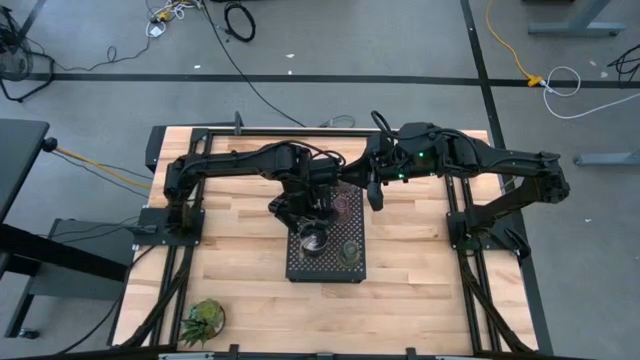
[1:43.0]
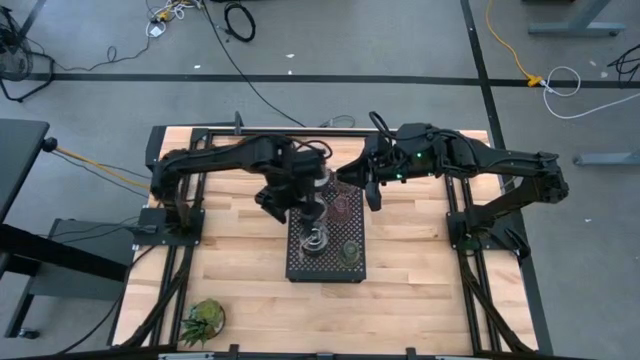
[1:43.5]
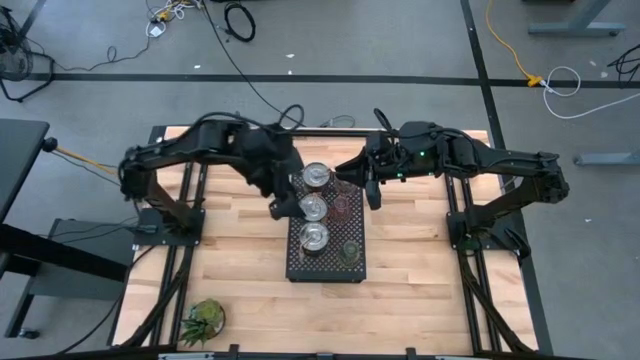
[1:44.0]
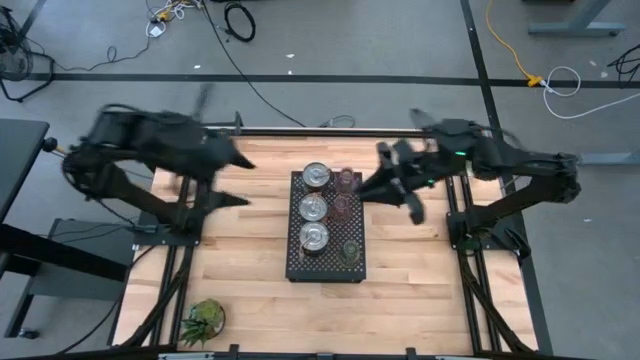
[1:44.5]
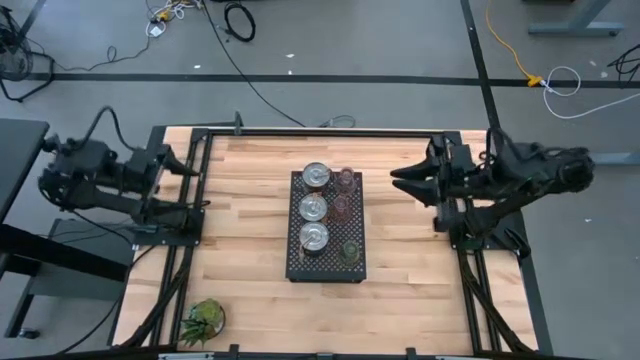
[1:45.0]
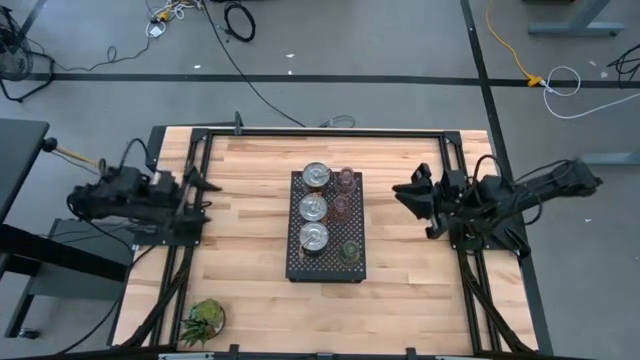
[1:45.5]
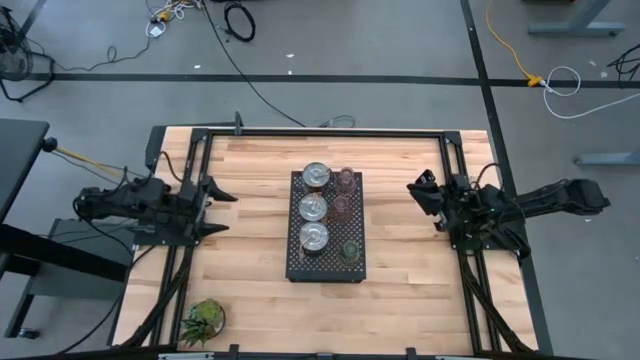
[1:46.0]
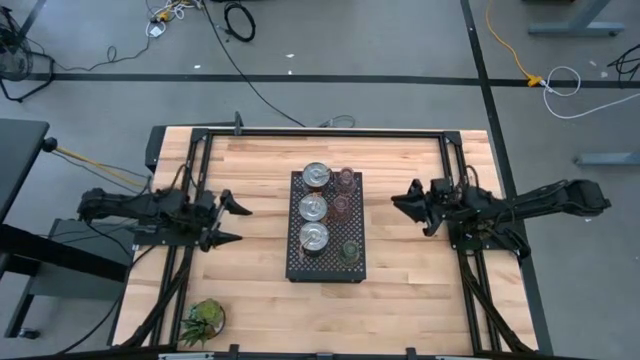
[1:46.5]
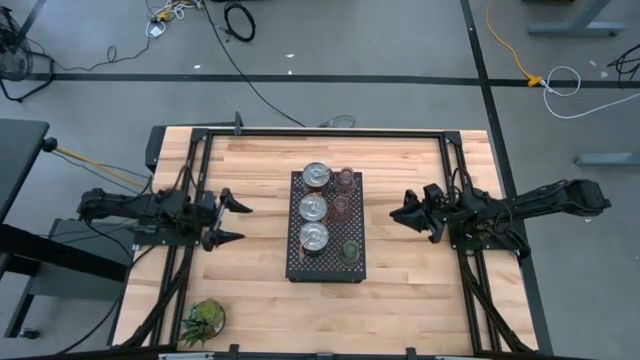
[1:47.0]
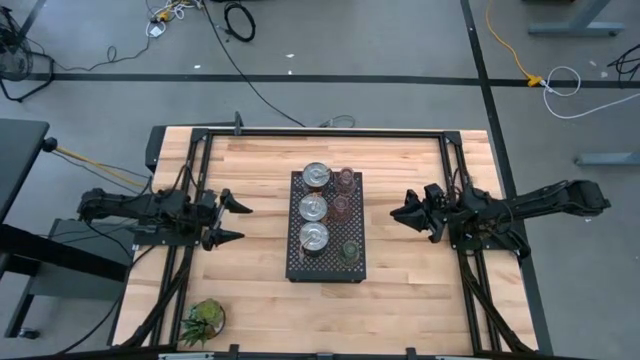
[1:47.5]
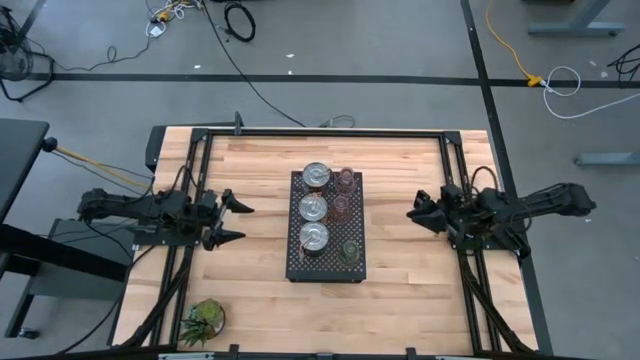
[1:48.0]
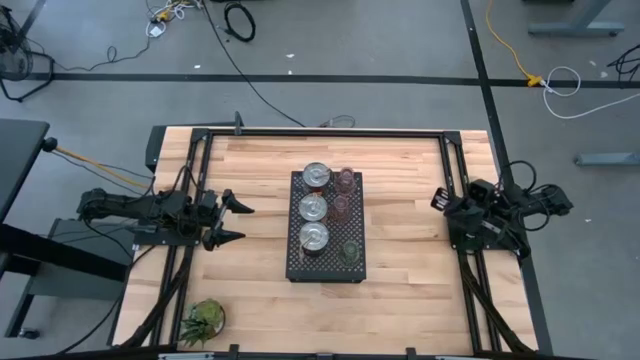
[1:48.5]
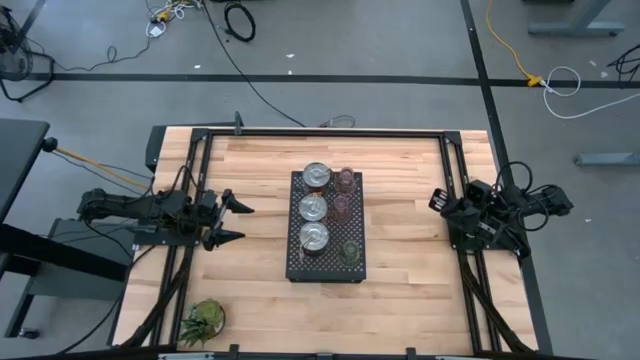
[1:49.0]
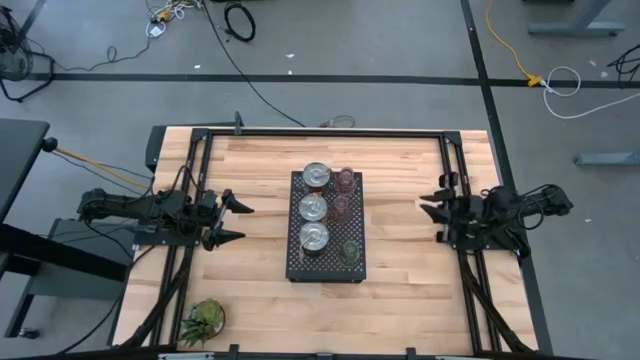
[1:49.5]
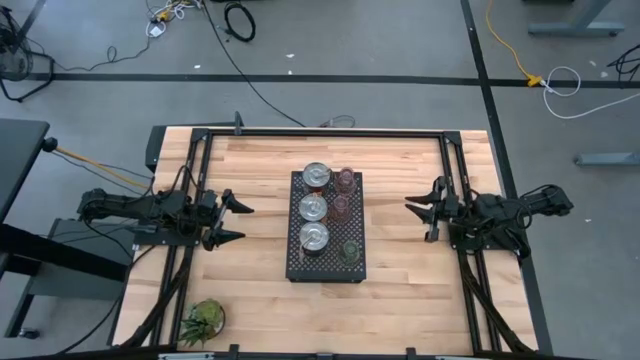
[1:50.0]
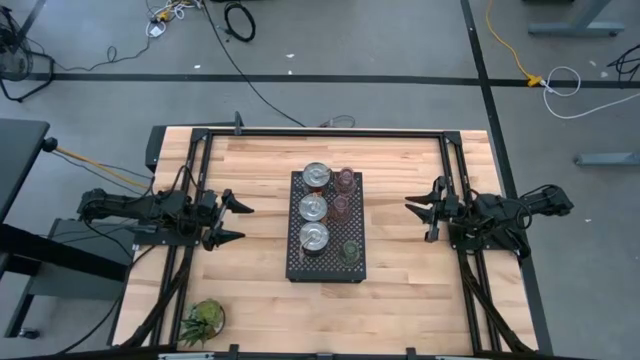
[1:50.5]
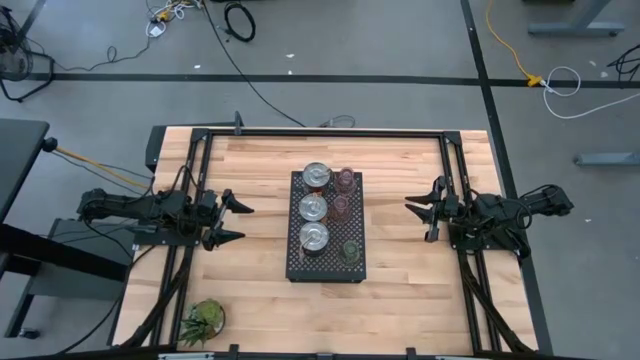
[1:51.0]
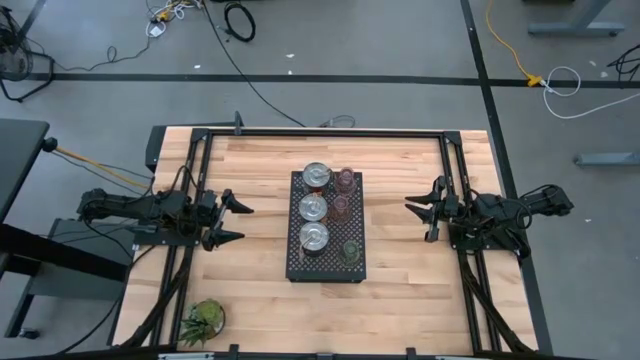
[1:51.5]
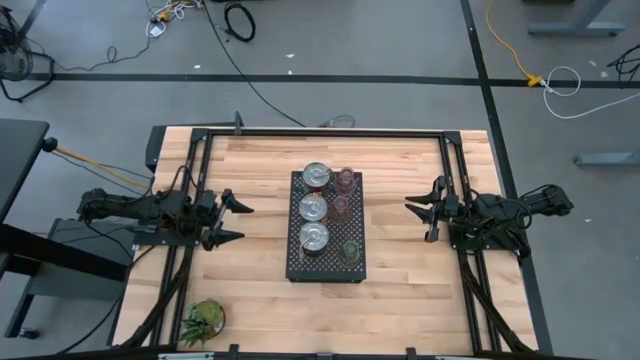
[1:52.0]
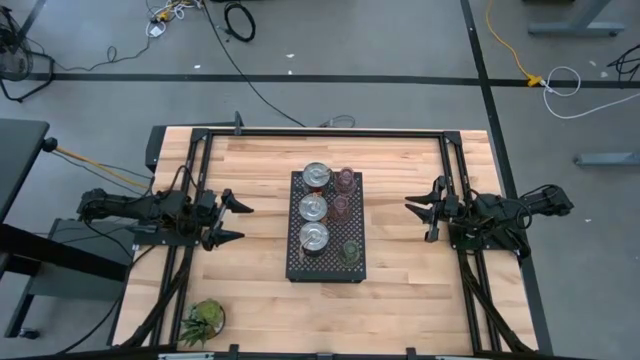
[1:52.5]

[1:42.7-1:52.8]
Task: Pick & Place candle stick holders
Return to Home Position

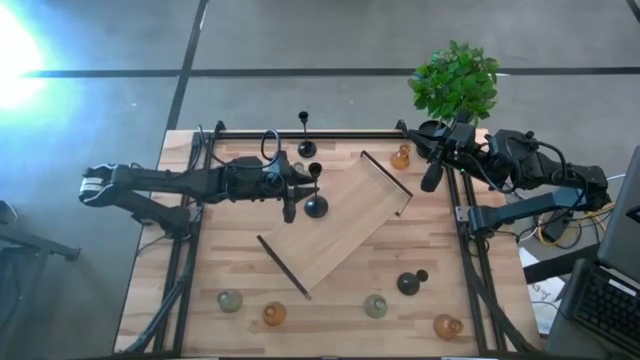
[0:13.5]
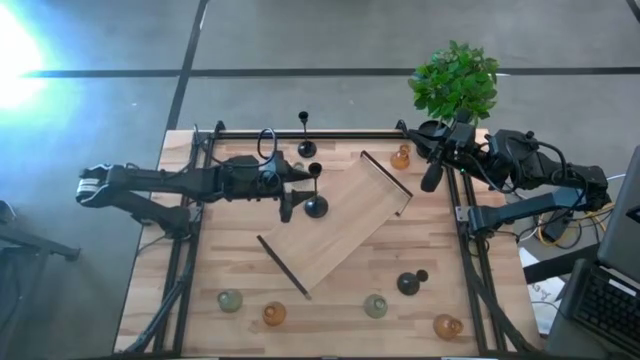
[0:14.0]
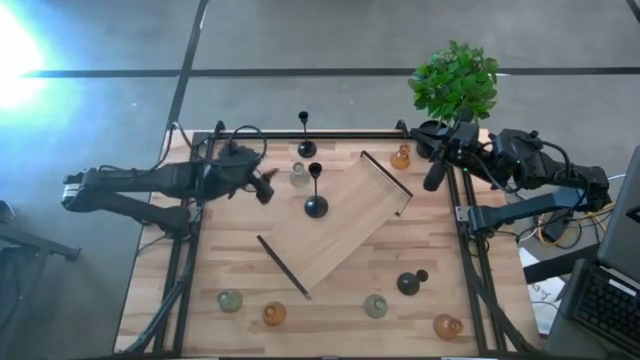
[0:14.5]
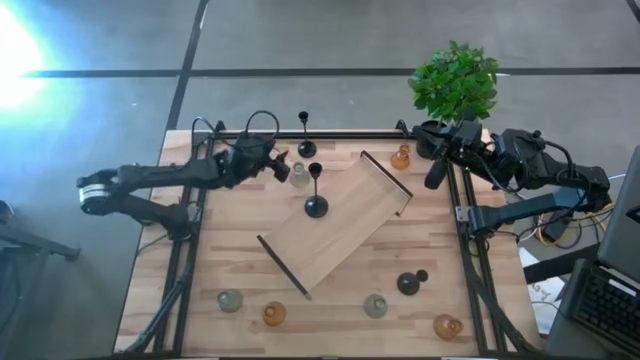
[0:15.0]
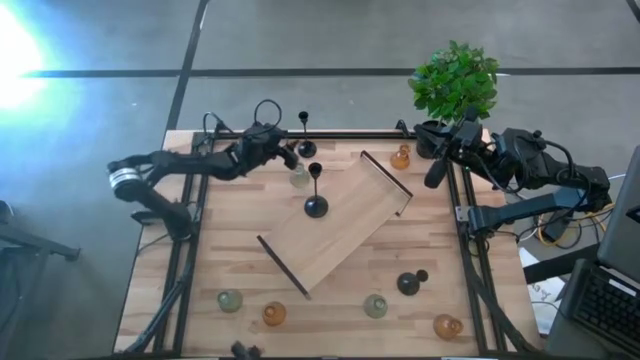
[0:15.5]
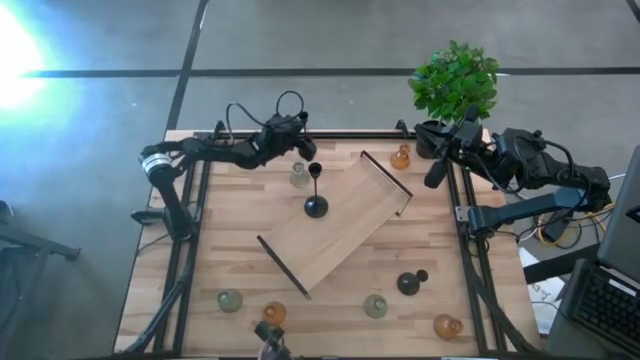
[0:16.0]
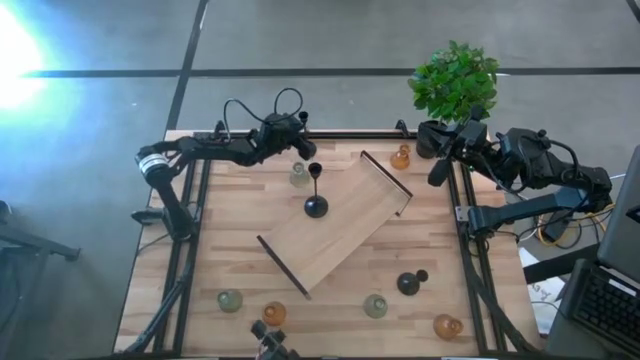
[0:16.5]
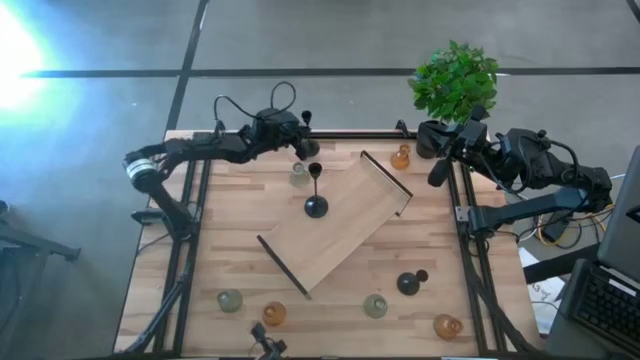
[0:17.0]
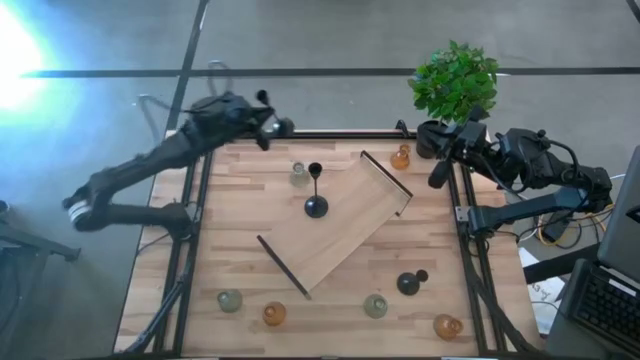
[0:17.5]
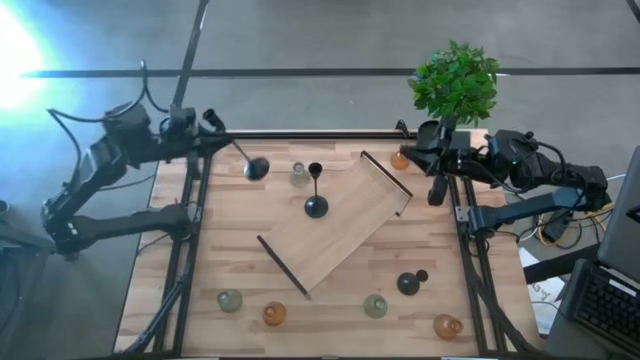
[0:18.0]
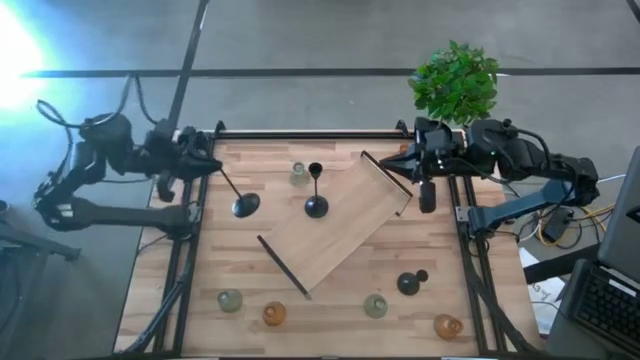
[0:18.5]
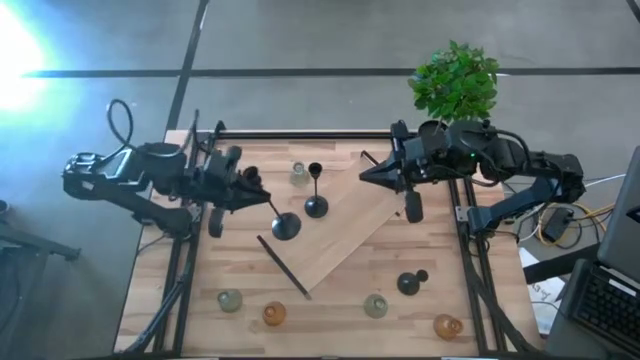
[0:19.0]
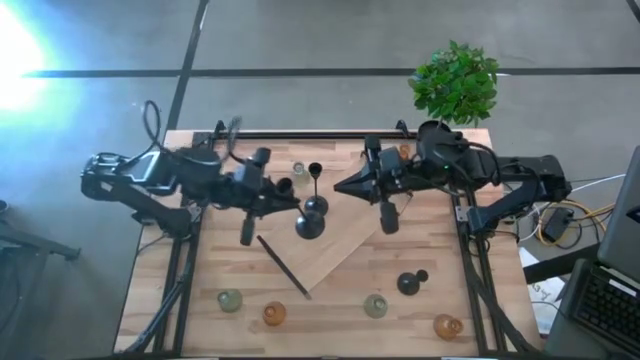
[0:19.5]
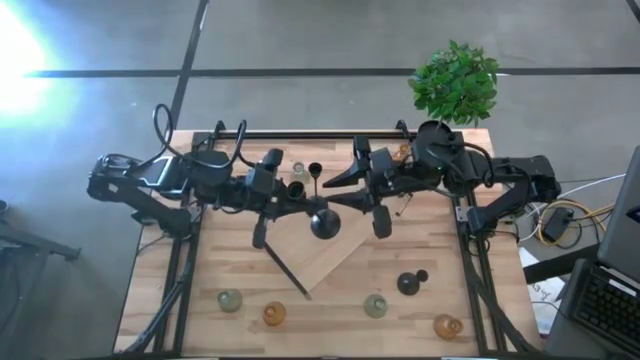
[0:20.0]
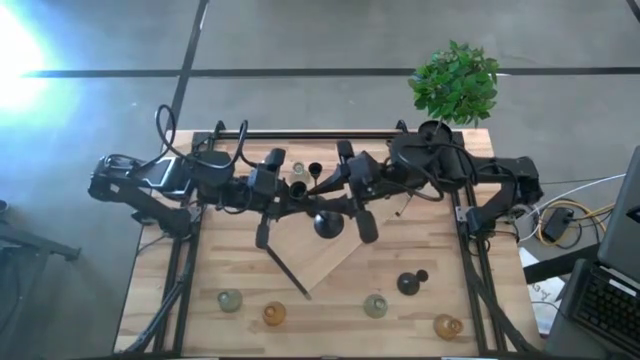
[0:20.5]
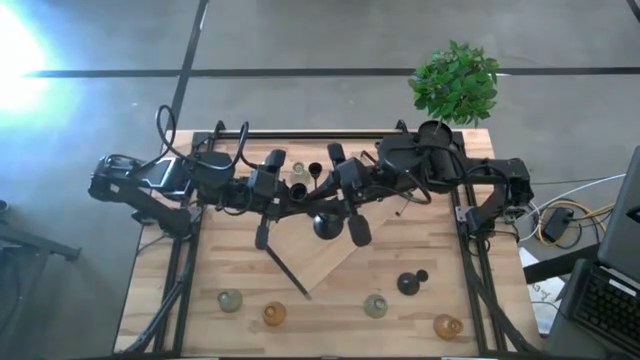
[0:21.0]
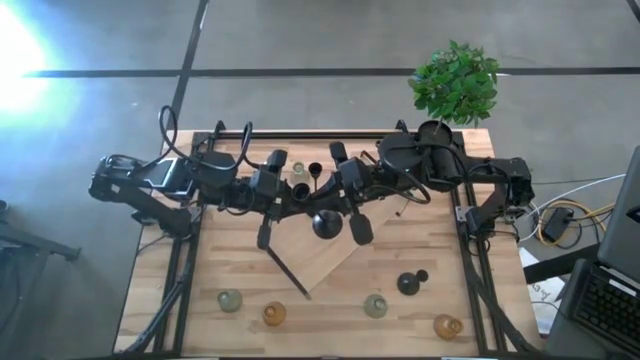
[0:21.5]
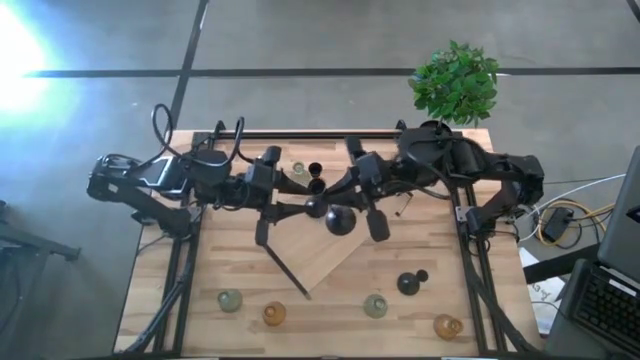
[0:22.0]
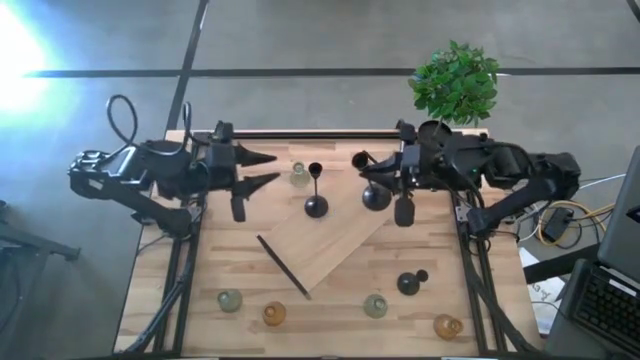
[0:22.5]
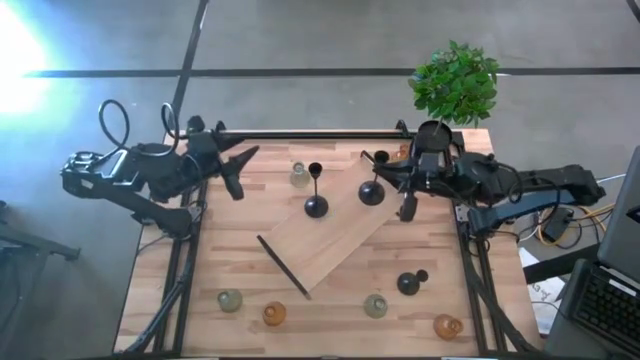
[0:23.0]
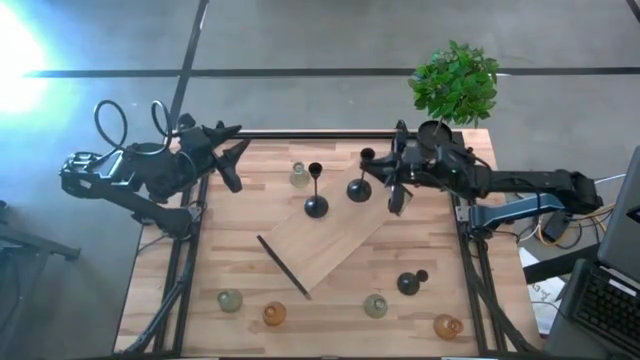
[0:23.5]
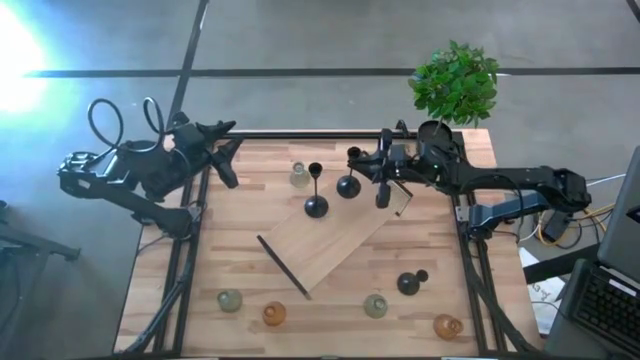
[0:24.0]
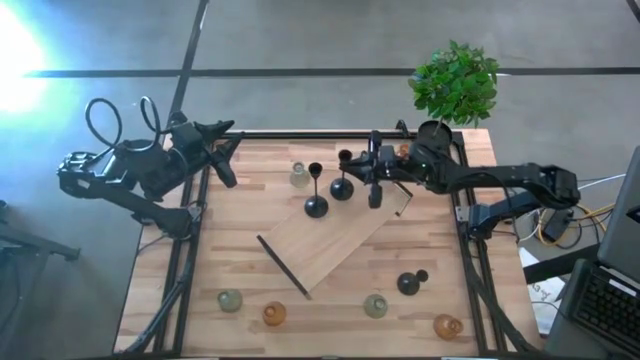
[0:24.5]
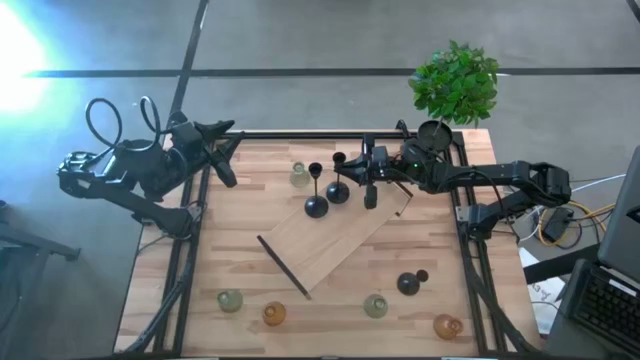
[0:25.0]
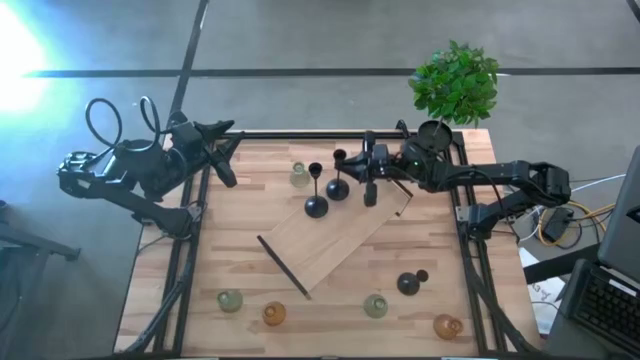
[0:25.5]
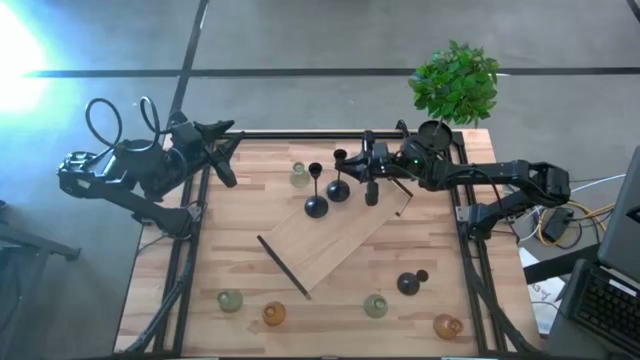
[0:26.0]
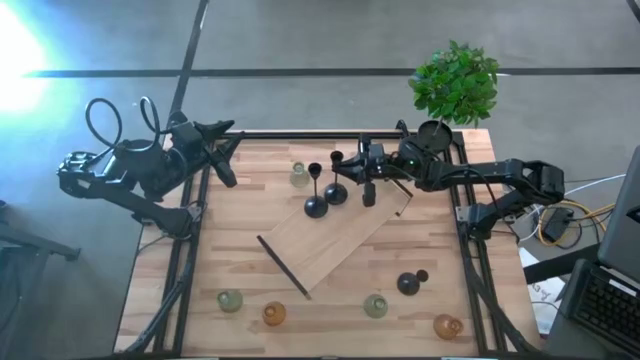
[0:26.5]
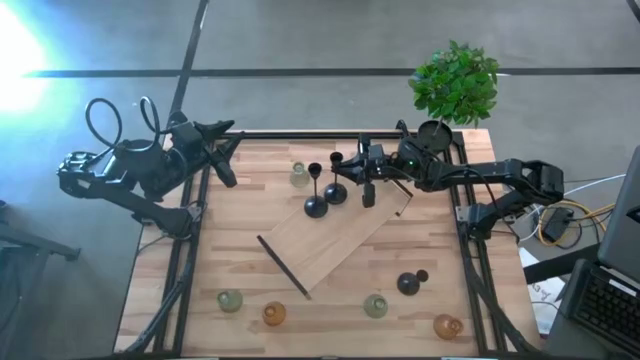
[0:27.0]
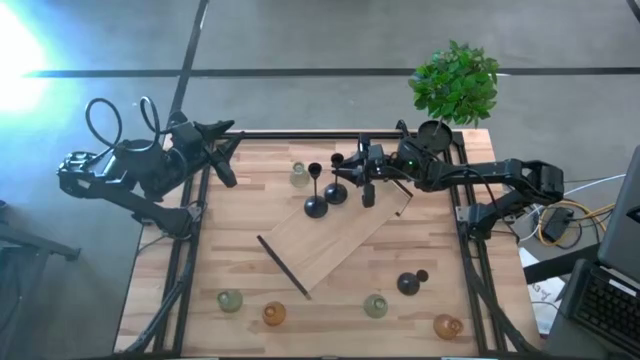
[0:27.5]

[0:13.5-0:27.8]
Task: Pick & Place candle stick holders
Put the top black candle holder on the shelf
